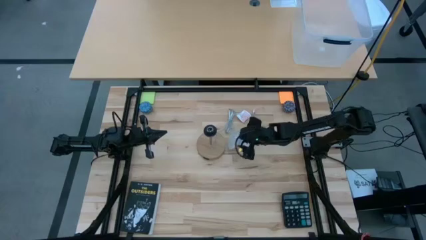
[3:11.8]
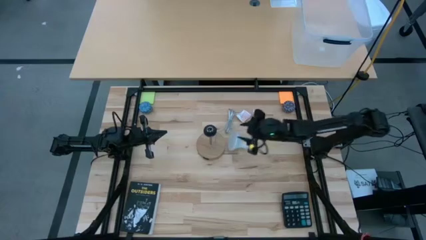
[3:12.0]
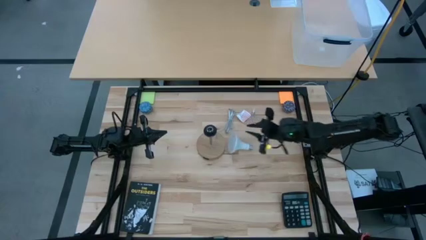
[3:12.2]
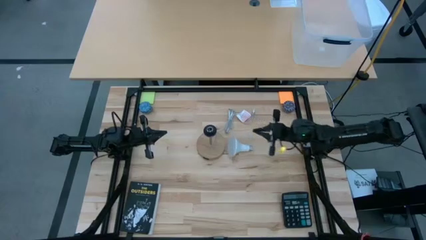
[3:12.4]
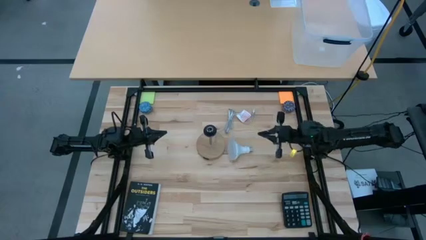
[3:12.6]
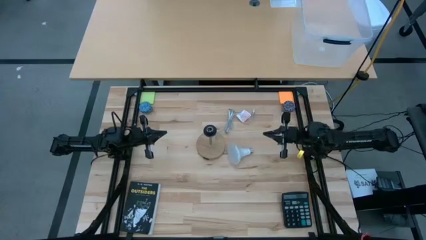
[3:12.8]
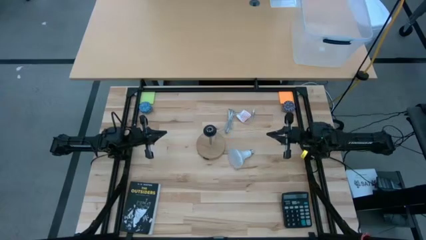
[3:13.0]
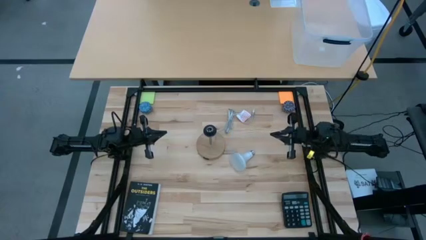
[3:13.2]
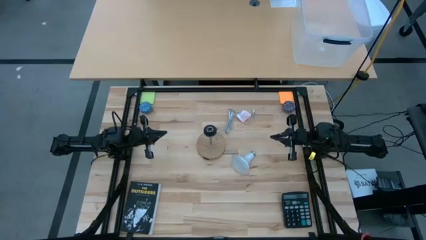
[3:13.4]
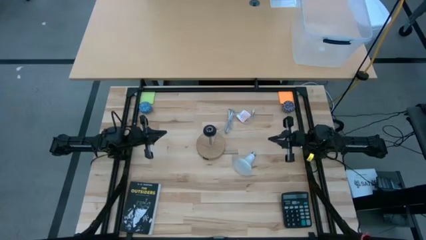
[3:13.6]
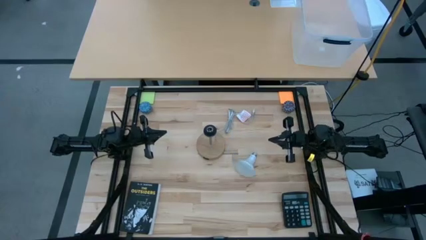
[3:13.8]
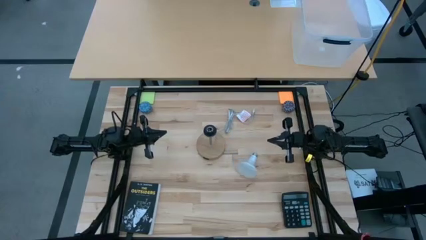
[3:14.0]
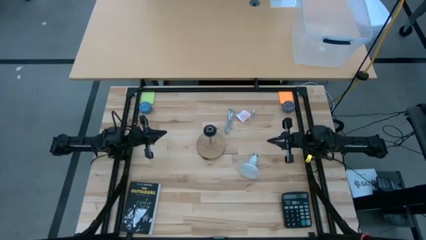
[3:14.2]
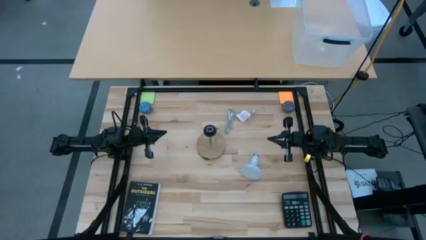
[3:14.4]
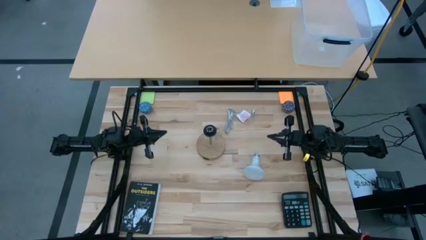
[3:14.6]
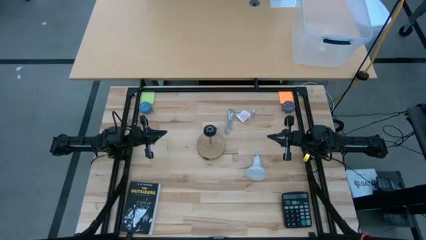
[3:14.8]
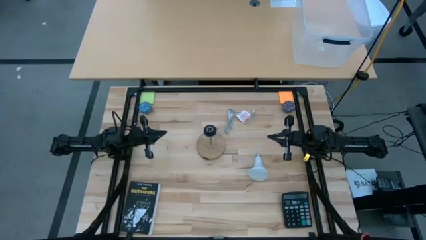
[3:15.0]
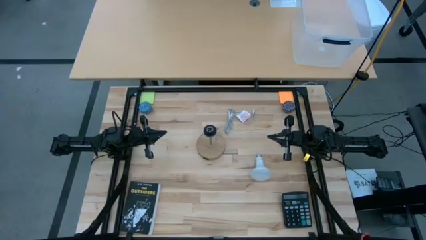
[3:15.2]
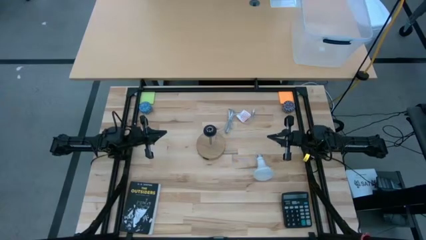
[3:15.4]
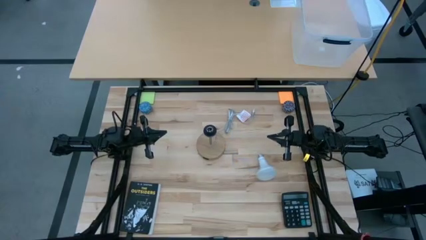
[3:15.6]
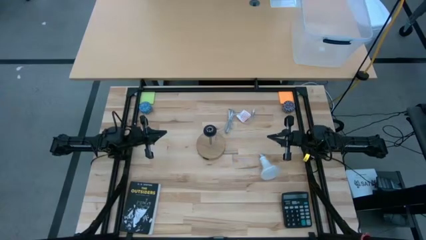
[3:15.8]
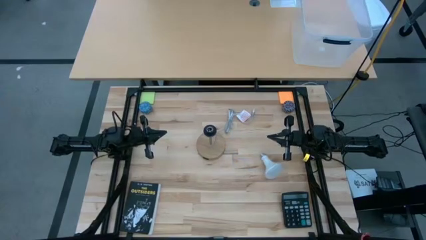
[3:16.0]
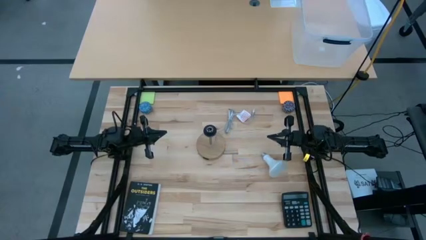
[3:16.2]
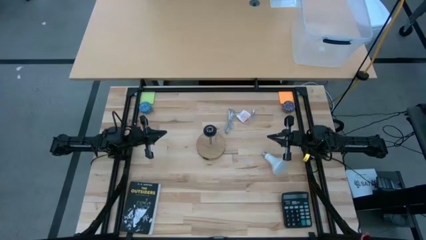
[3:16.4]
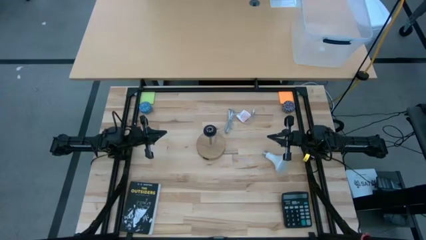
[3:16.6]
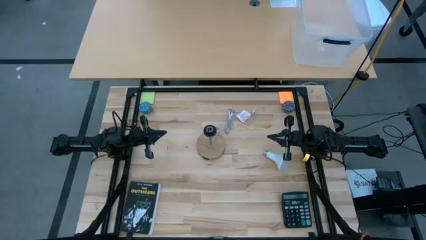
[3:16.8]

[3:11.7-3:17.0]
Task: Screw lightbulb
Return to Home Position

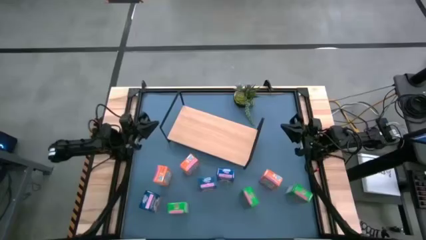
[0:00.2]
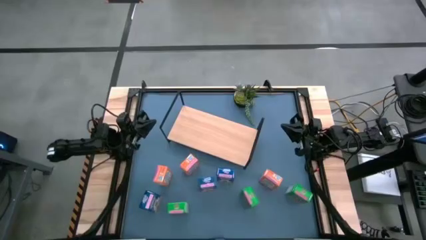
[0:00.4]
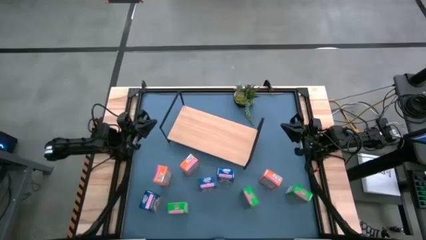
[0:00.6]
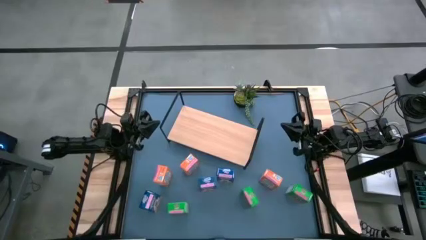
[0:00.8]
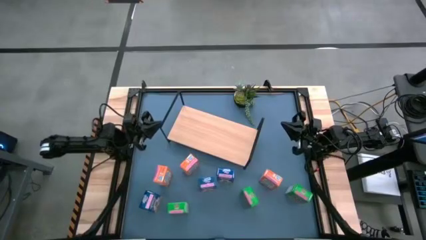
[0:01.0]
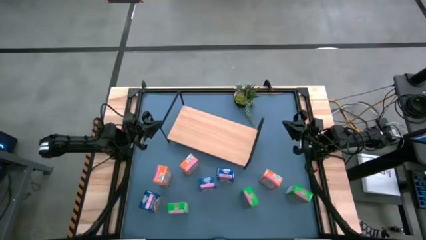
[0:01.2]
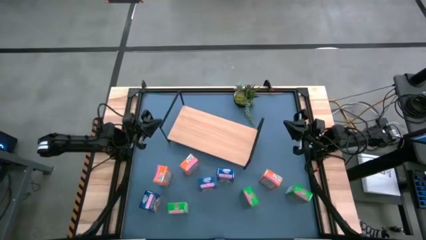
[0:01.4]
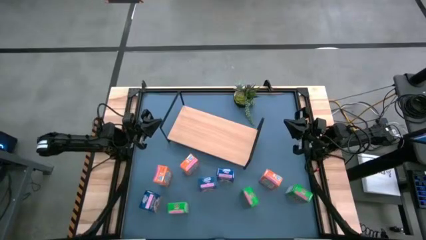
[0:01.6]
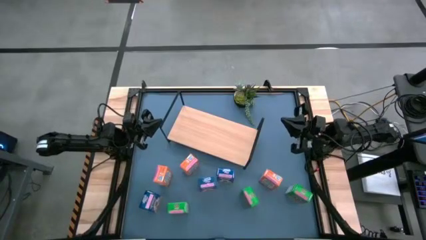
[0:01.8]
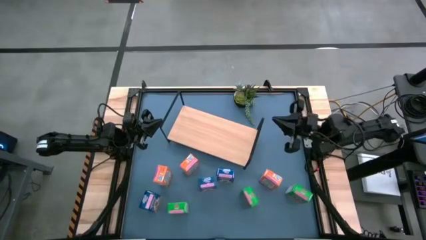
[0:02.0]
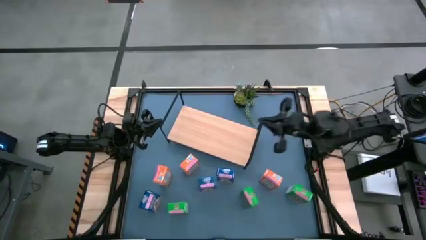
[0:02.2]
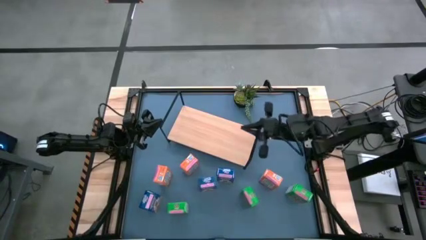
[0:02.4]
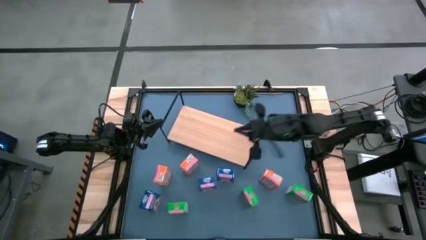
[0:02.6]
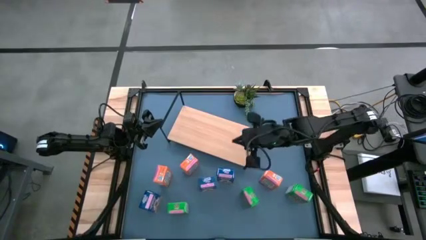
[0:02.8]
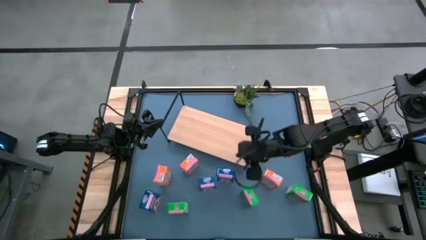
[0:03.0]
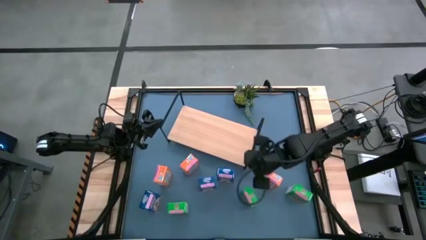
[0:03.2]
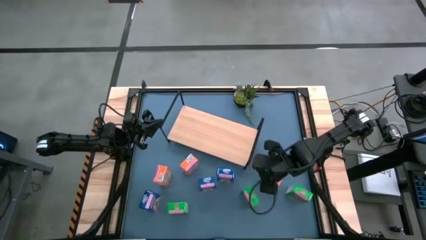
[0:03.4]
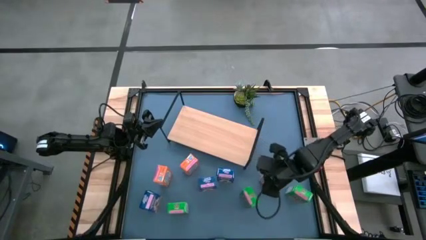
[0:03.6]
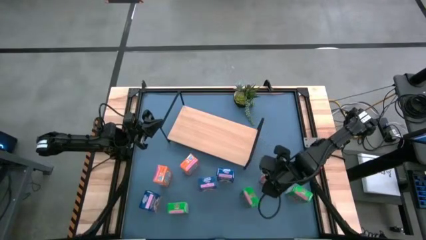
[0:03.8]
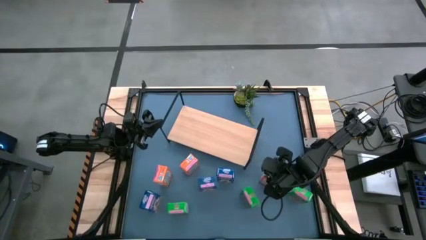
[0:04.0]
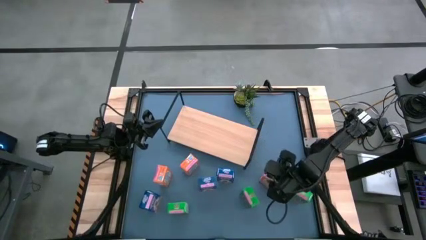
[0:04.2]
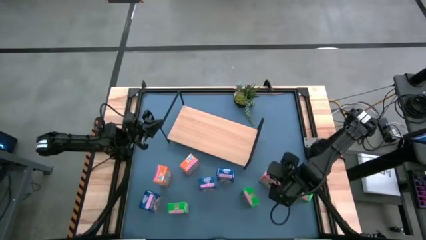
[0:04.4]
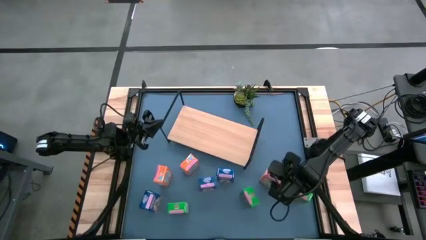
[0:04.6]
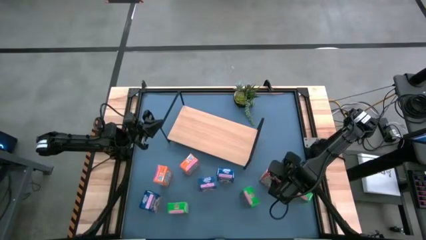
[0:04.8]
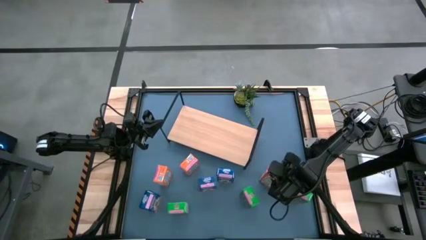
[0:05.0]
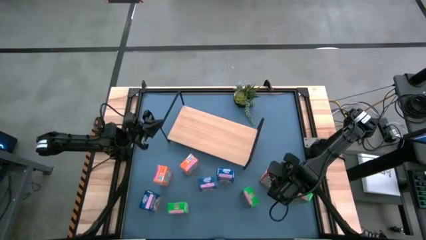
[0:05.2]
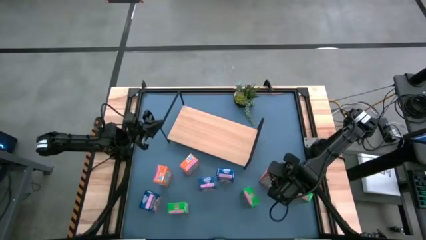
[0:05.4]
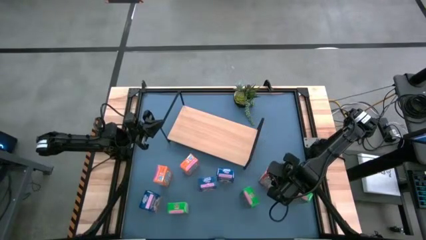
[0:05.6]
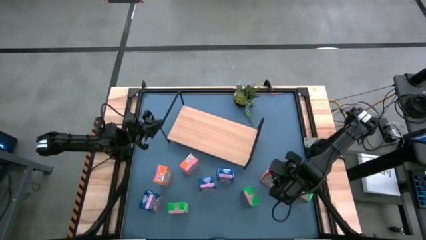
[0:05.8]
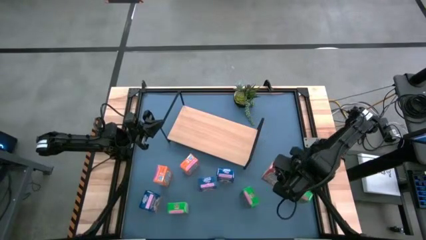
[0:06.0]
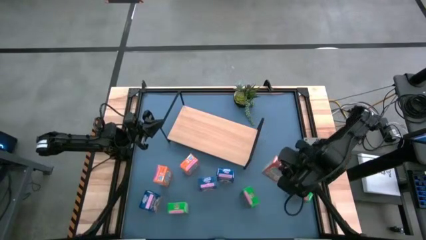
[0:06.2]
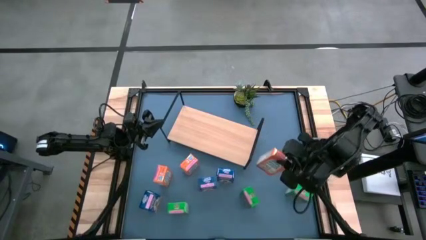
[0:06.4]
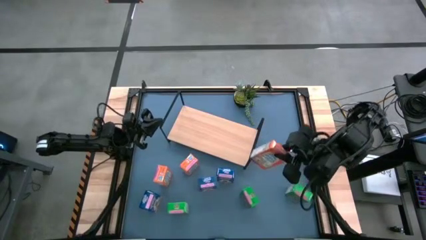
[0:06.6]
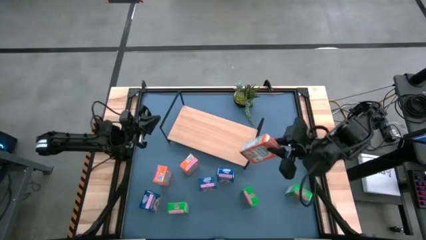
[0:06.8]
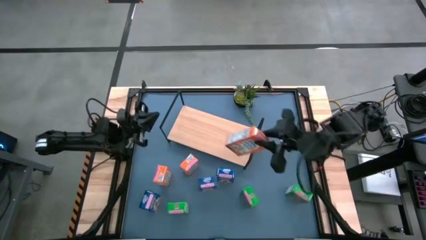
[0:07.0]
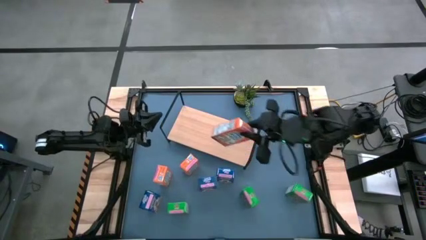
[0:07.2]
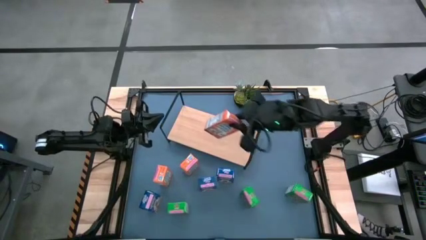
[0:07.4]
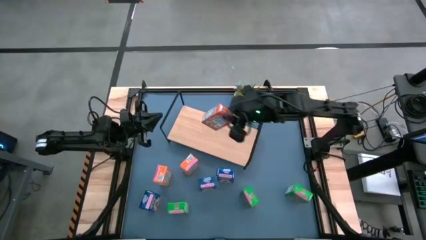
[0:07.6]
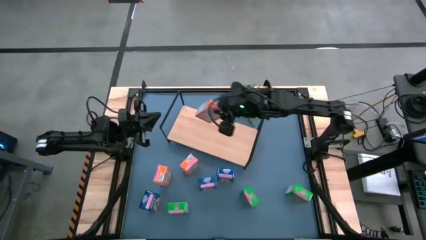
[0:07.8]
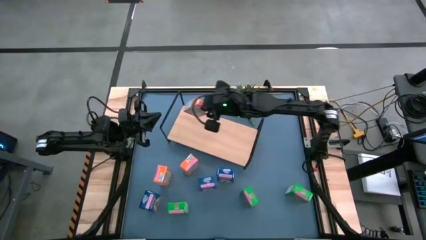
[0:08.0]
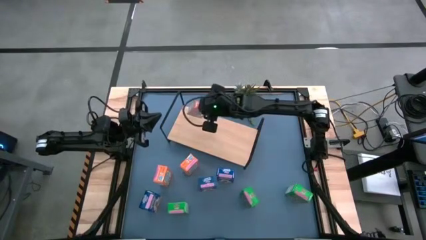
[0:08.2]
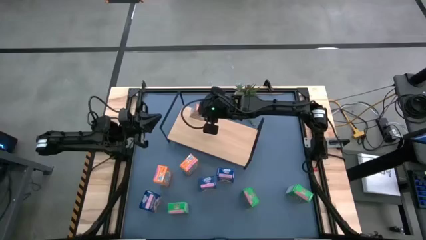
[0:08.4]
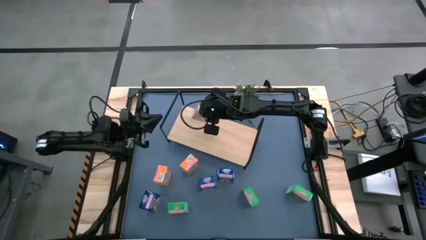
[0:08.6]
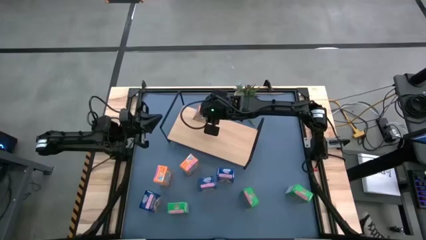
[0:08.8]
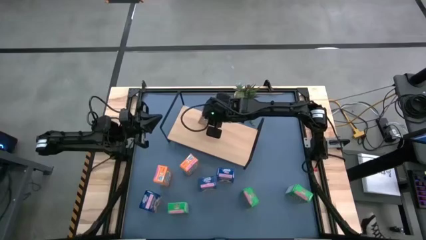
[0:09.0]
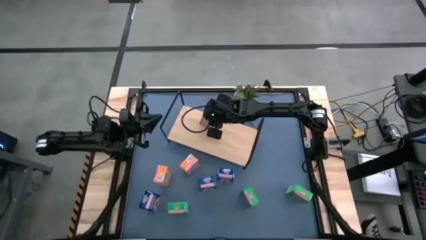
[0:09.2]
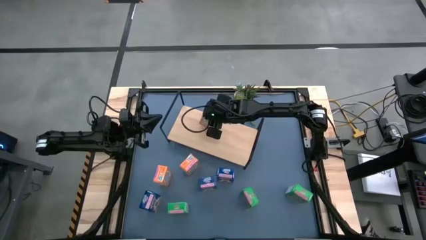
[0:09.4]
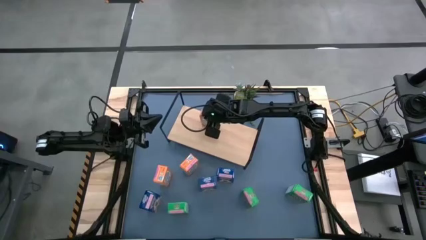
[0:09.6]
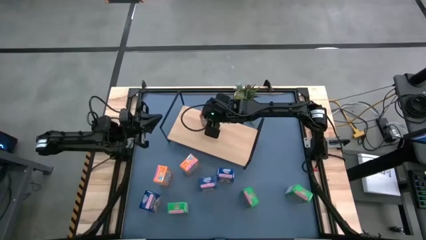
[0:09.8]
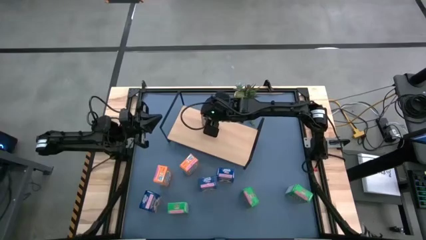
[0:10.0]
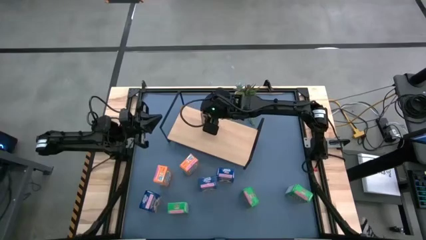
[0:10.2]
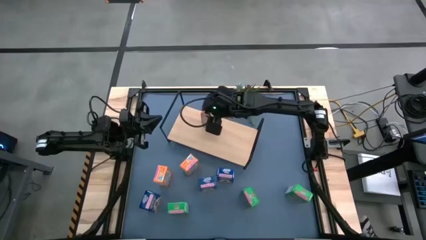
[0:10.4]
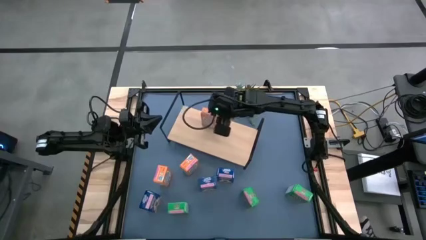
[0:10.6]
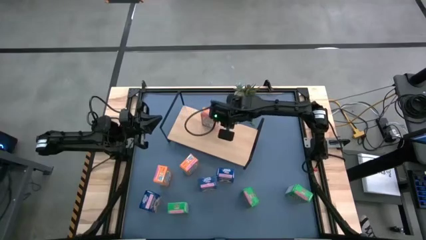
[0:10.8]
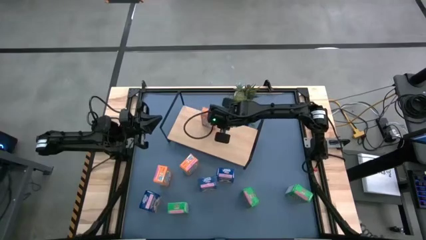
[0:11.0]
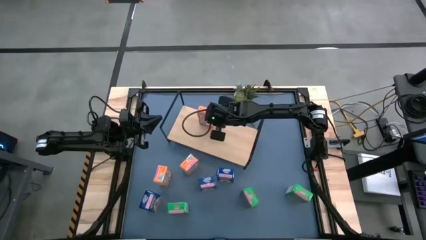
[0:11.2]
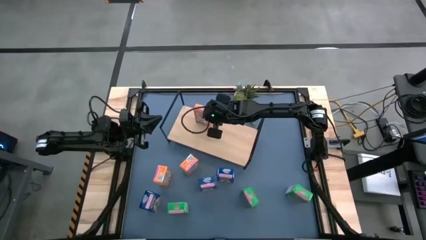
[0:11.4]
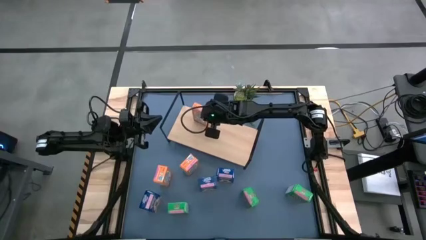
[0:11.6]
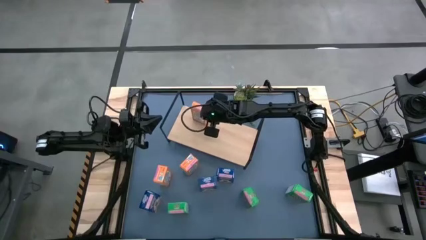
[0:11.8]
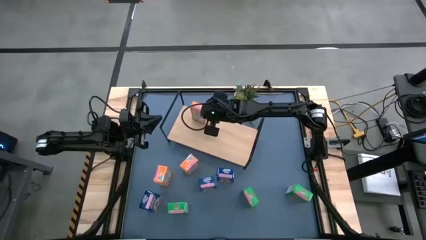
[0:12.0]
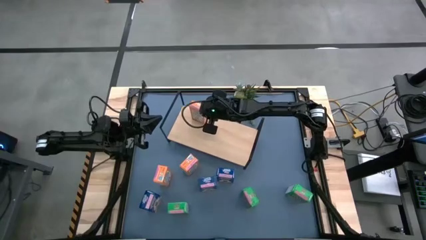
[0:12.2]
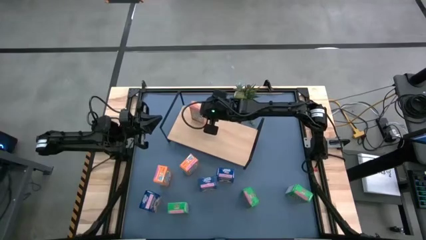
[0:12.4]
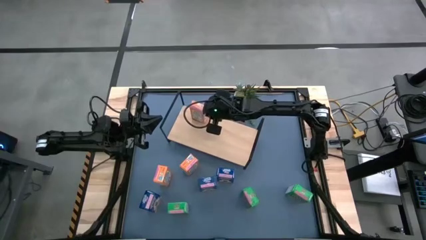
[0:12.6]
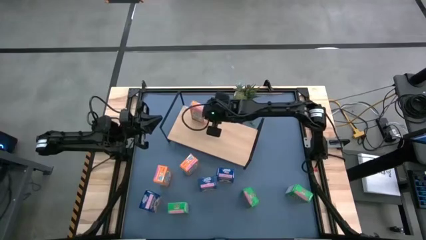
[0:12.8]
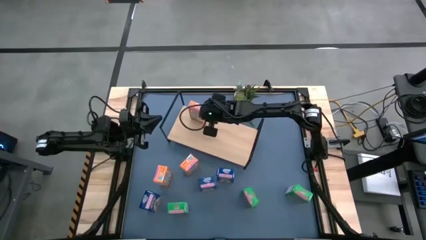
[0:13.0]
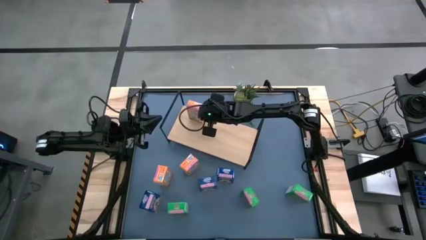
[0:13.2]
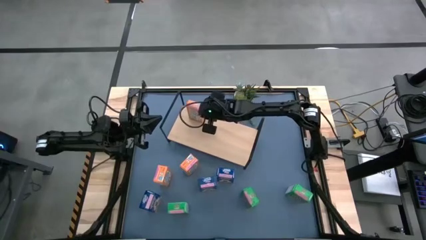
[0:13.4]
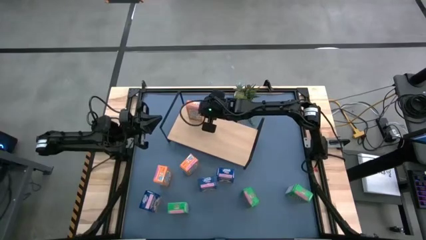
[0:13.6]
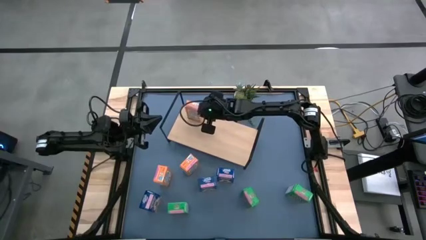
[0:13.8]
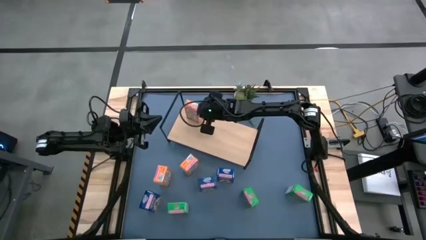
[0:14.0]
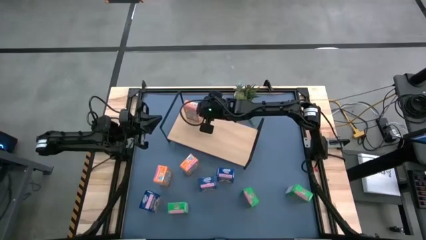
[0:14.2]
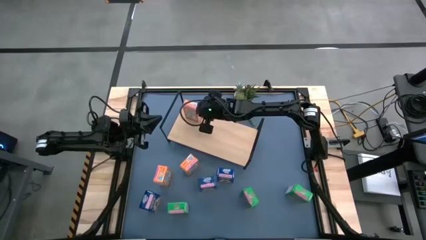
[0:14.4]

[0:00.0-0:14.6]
Task: Stack cereal on shelf
Put the right orange cereal box on the shelf
